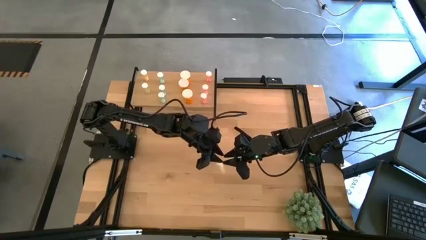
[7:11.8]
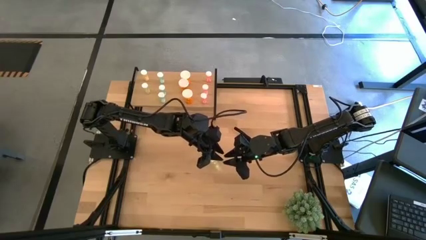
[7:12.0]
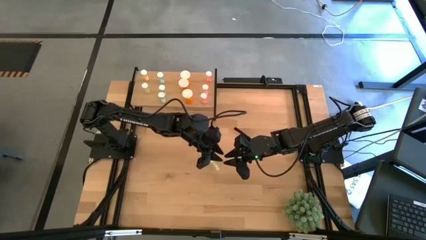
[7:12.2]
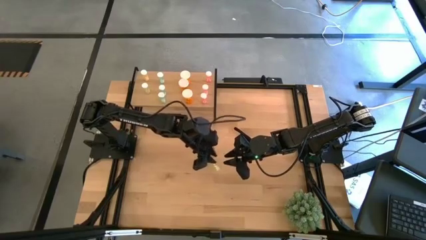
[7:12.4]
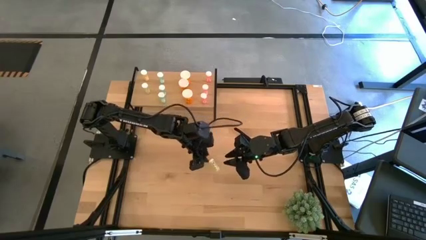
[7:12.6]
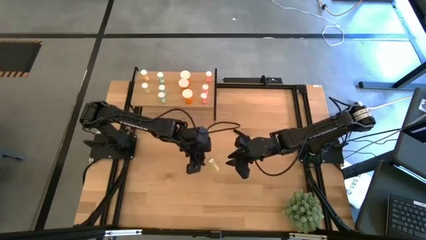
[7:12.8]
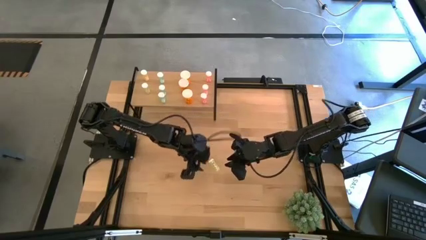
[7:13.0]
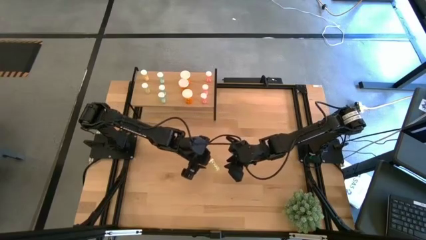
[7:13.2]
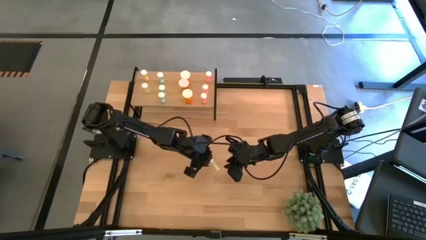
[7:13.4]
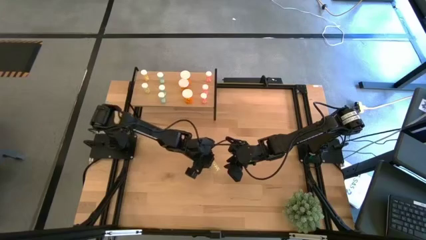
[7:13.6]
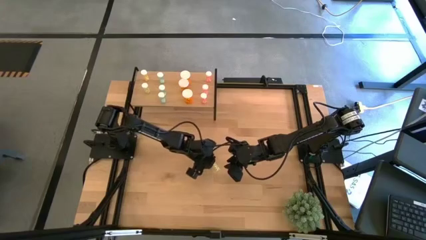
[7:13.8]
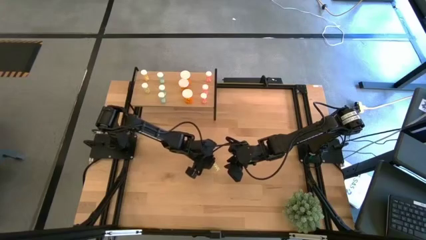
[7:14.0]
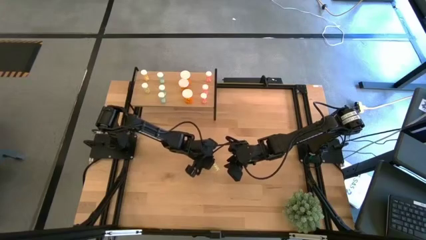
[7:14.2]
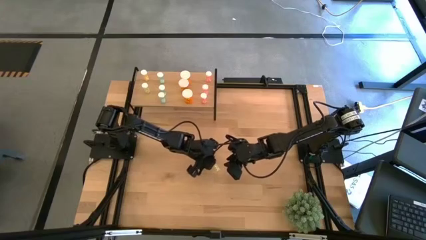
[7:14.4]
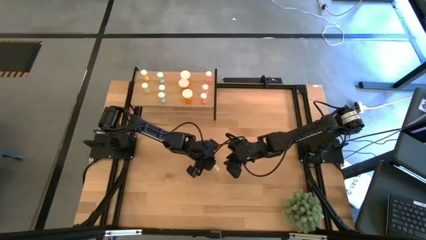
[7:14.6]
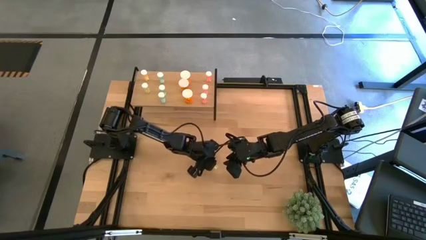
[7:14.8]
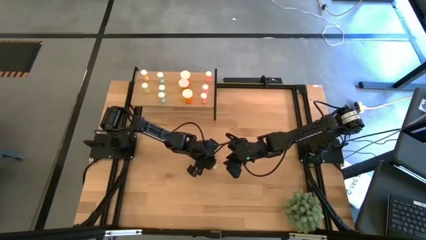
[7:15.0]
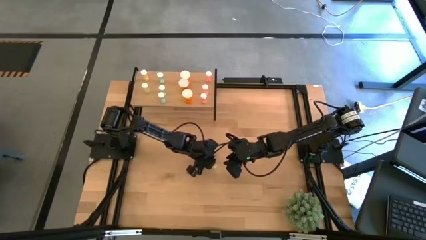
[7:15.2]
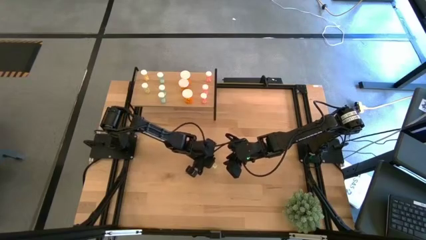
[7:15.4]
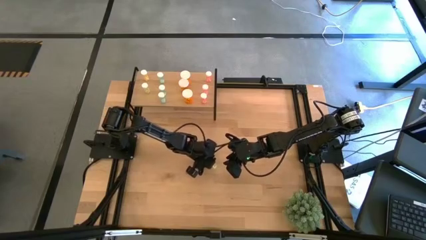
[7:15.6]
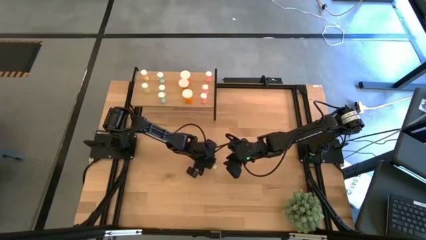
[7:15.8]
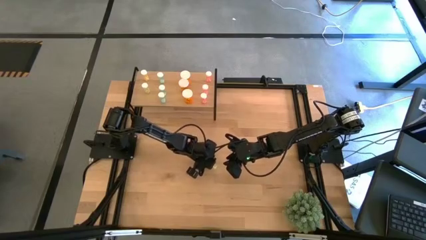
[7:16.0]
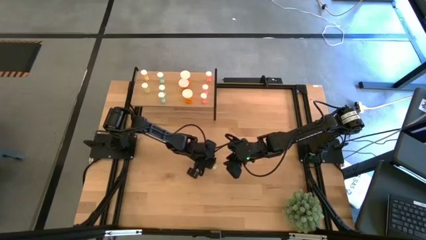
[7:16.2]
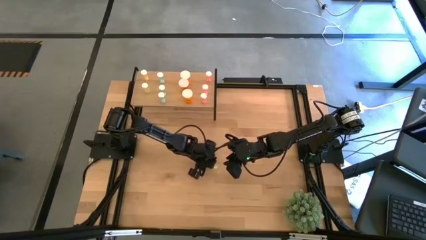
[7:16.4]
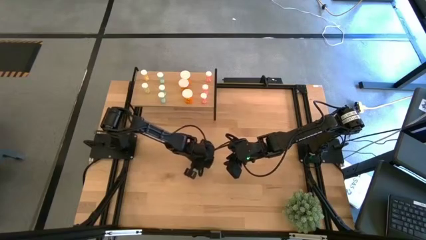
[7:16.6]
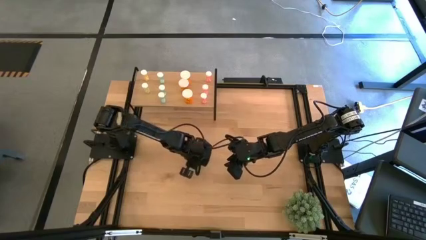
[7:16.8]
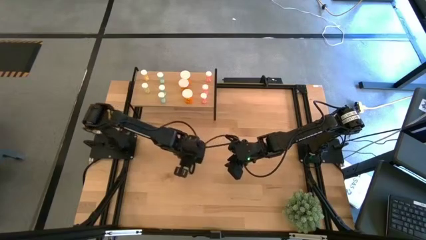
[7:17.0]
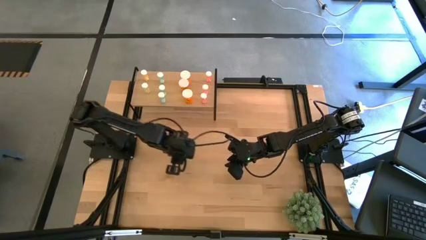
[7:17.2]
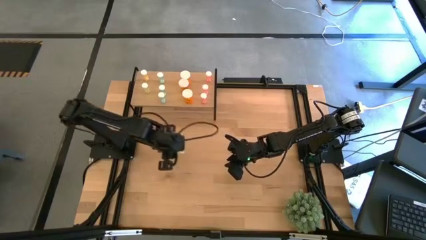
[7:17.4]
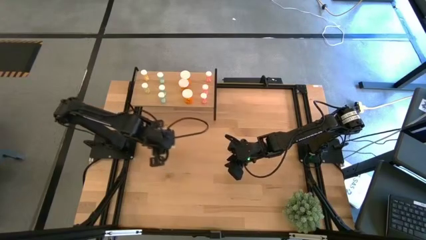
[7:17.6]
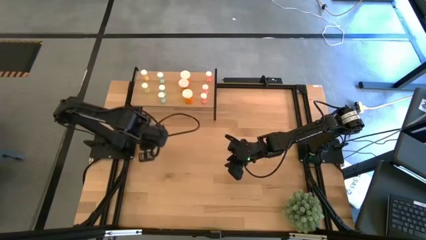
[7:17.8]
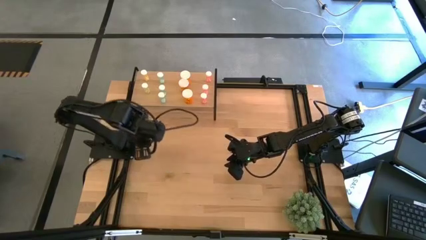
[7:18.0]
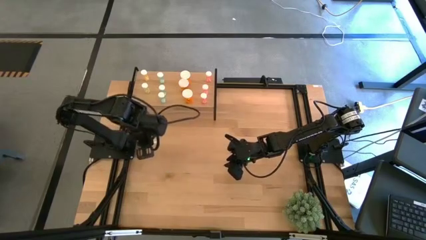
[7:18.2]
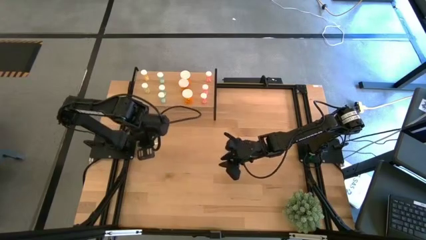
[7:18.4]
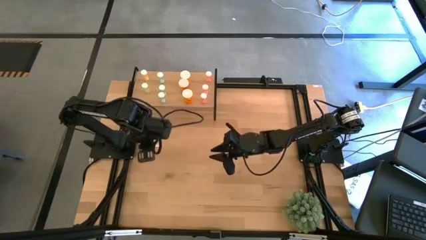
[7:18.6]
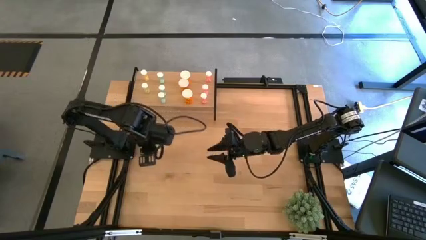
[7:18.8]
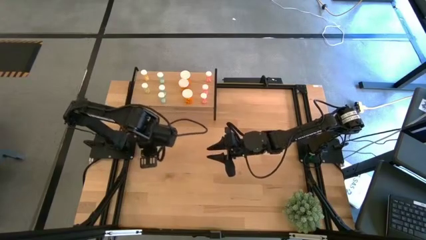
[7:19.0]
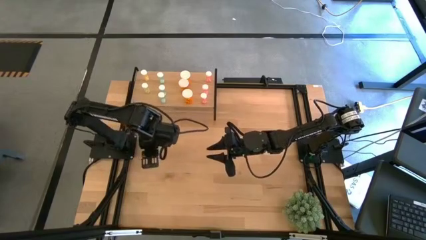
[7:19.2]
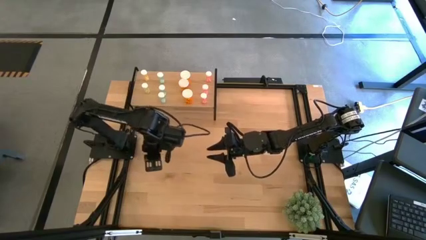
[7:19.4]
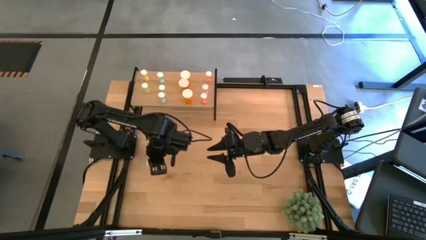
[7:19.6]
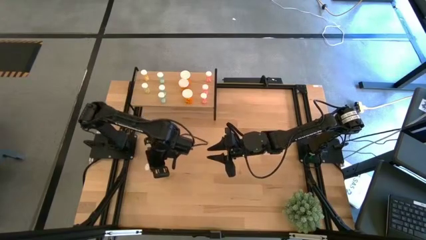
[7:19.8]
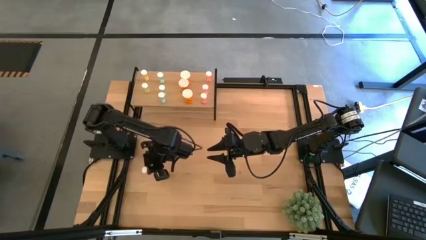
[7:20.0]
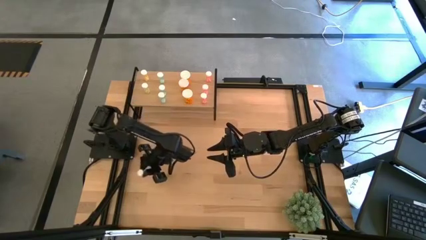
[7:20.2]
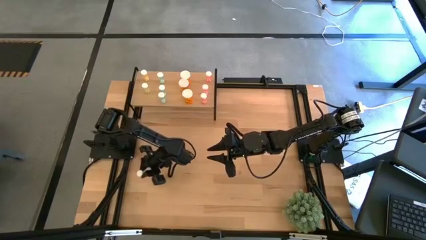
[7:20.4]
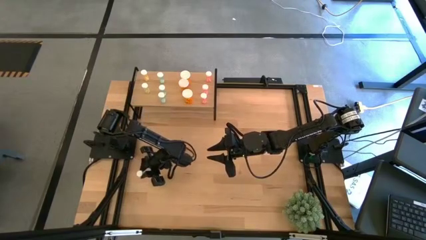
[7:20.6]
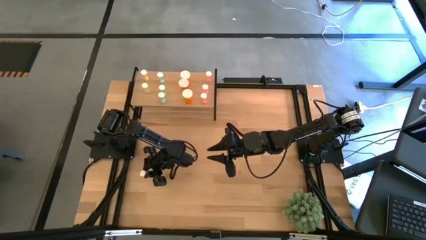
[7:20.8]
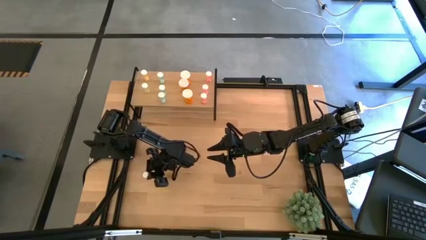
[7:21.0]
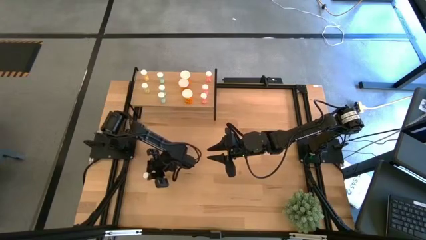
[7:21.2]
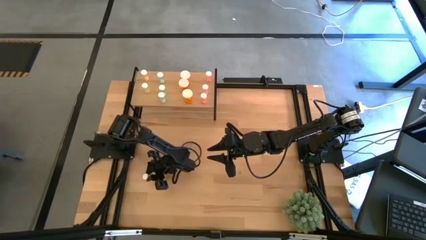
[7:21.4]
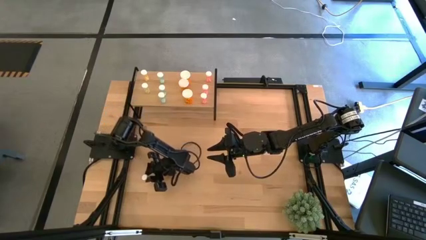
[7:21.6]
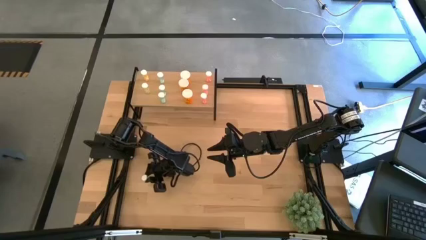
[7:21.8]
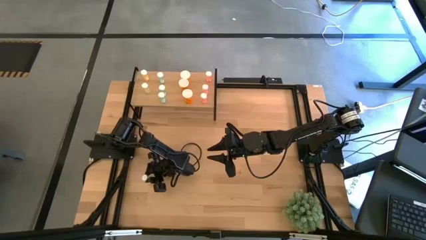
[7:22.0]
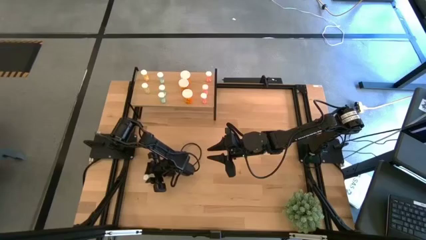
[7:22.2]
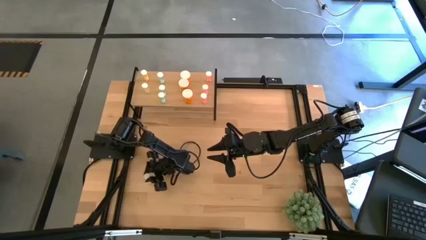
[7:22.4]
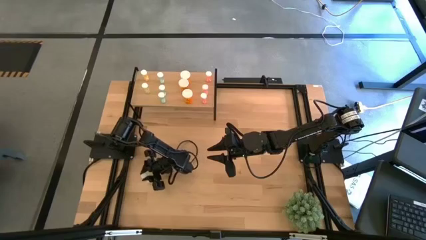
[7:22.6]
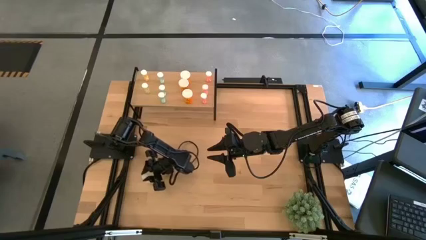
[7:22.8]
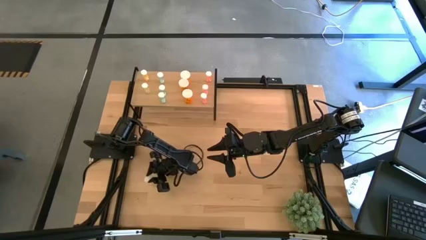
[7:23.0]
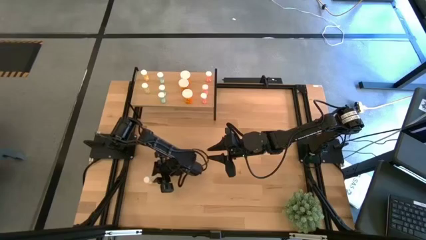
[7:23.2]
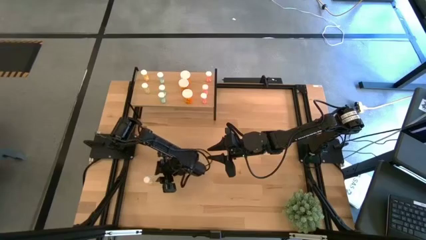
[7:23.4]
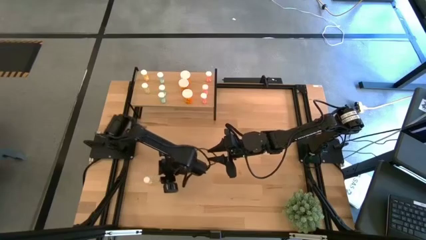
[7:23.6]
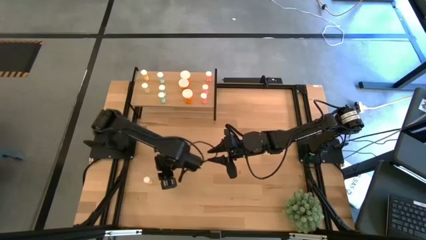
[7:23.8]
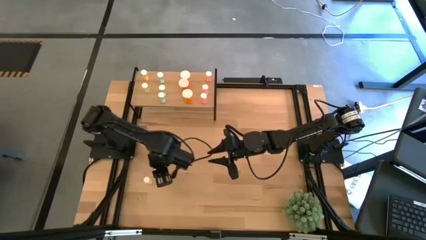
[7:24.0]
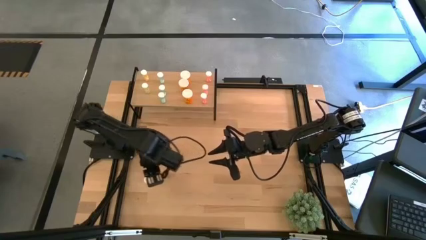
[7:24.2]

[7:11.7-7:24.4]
Task: Pick and place medicine bottles onto shelf by color
Put the yellow pill on the shelf aligned with the yellow pill on the shelf
